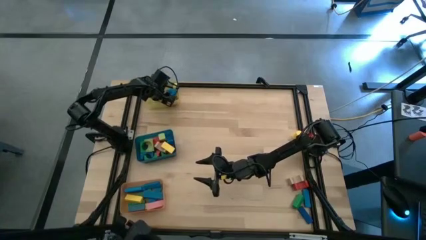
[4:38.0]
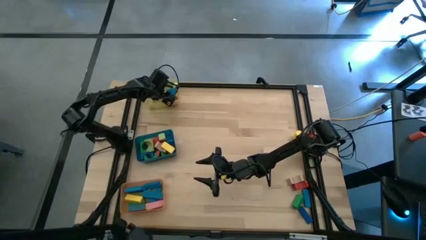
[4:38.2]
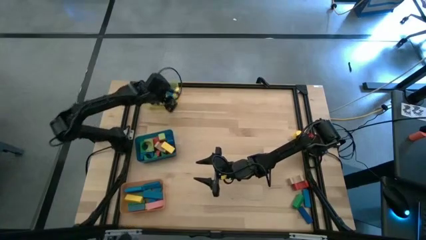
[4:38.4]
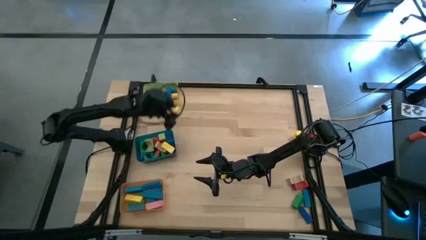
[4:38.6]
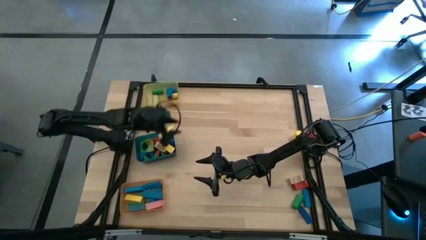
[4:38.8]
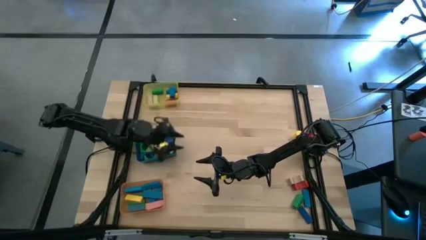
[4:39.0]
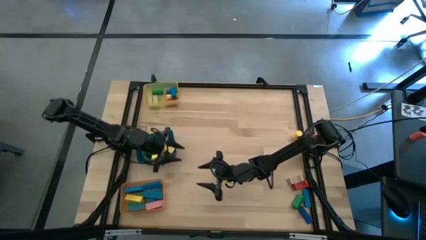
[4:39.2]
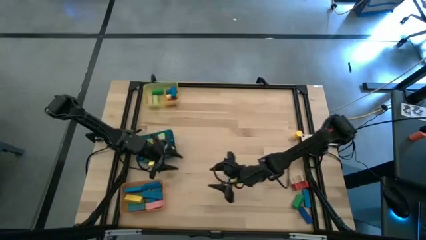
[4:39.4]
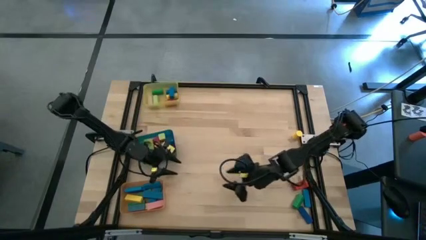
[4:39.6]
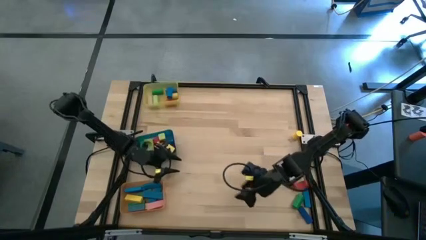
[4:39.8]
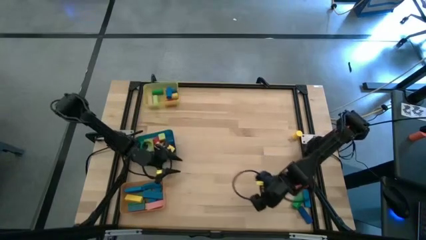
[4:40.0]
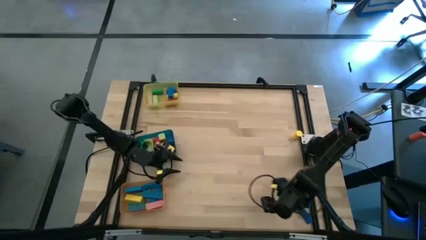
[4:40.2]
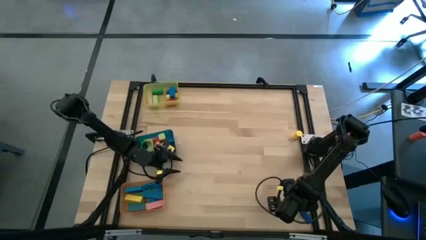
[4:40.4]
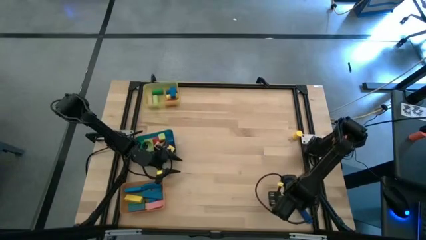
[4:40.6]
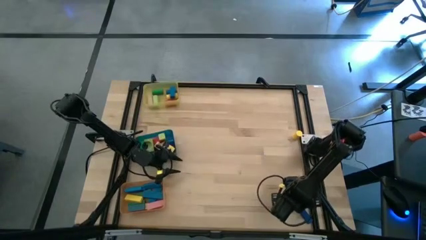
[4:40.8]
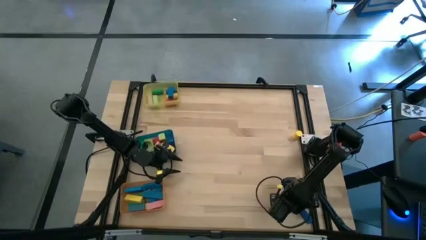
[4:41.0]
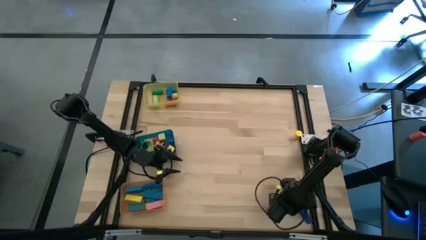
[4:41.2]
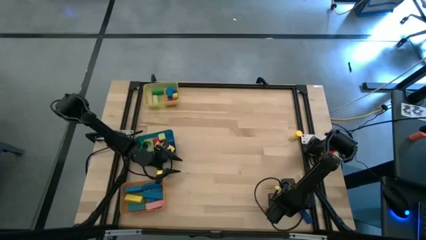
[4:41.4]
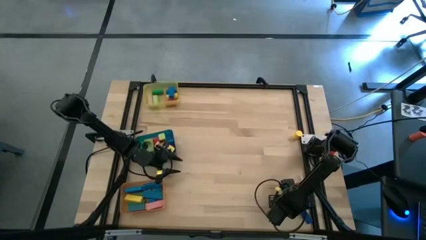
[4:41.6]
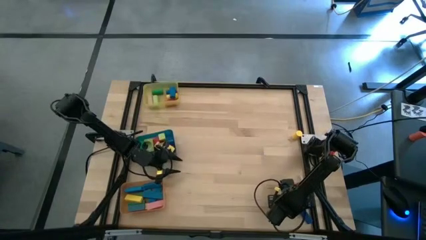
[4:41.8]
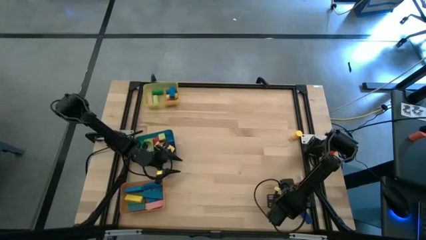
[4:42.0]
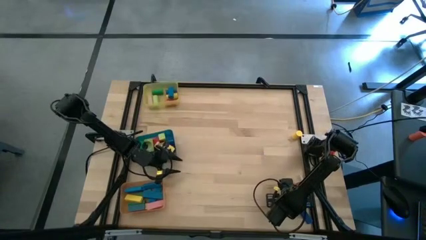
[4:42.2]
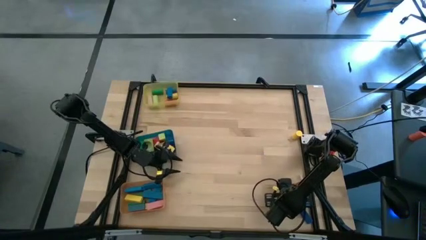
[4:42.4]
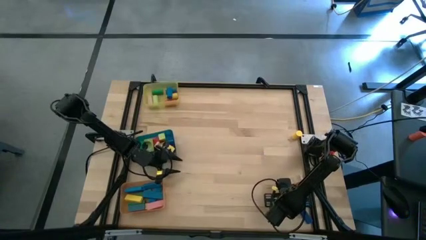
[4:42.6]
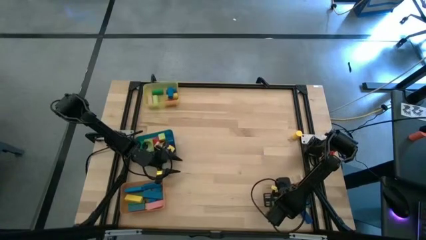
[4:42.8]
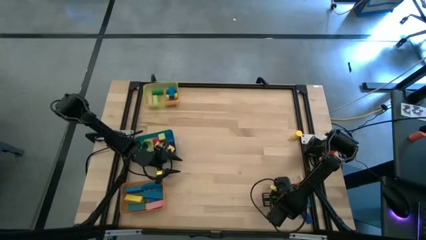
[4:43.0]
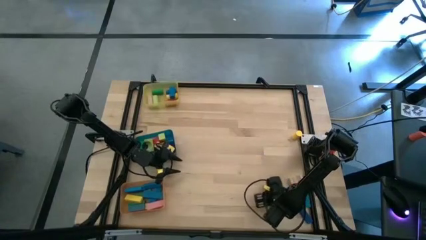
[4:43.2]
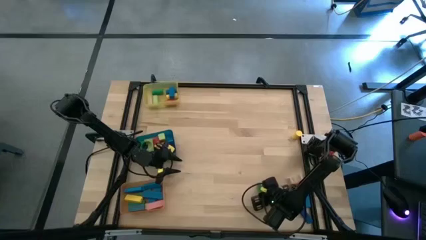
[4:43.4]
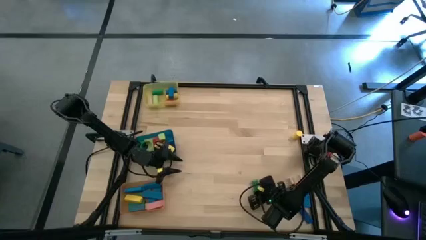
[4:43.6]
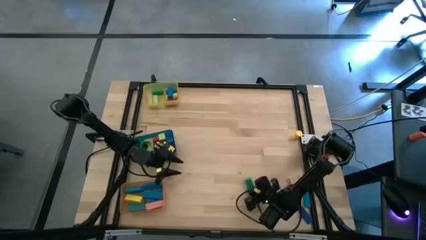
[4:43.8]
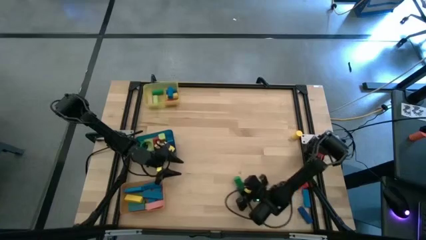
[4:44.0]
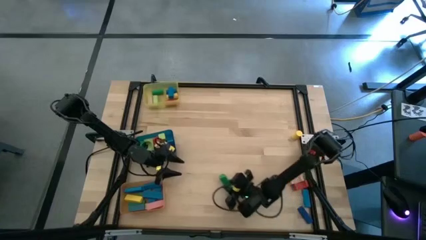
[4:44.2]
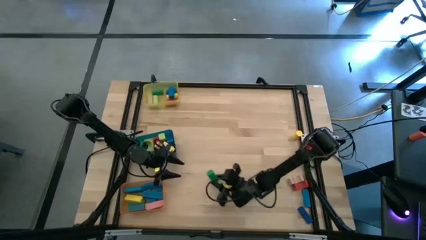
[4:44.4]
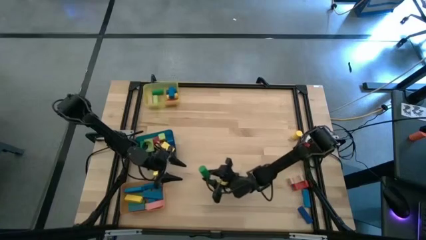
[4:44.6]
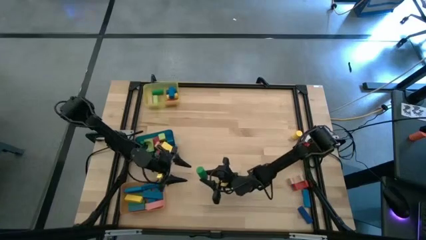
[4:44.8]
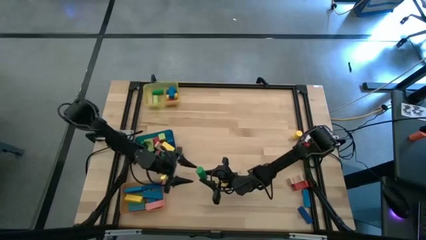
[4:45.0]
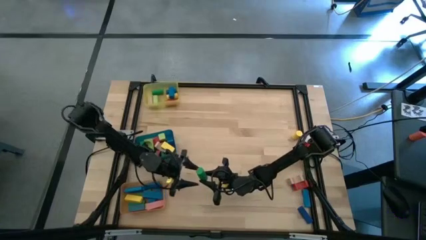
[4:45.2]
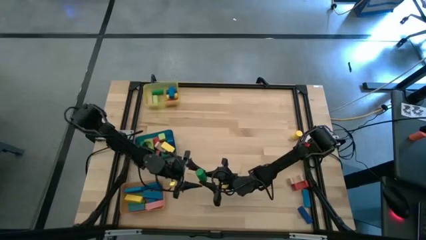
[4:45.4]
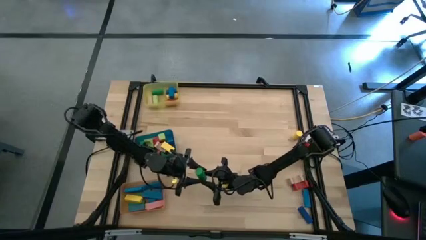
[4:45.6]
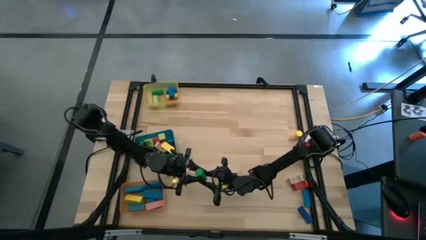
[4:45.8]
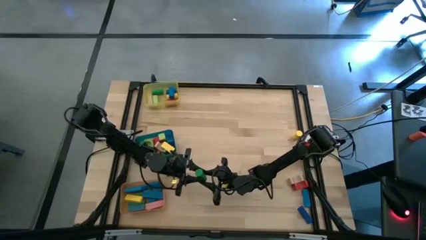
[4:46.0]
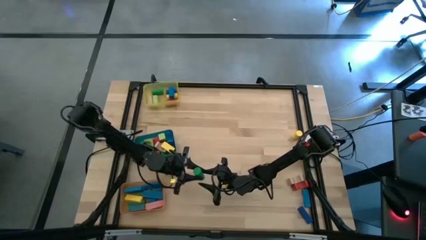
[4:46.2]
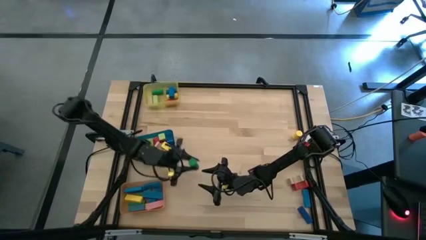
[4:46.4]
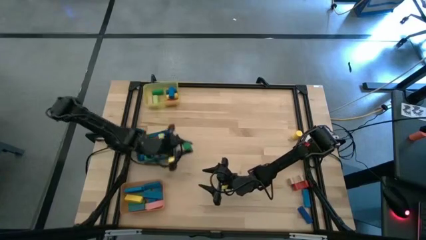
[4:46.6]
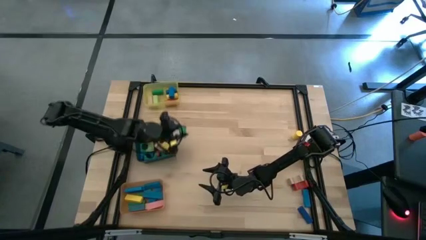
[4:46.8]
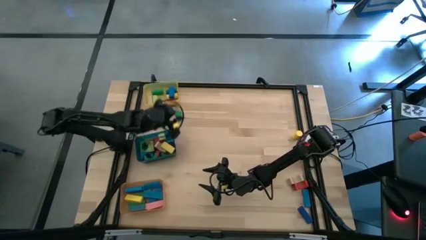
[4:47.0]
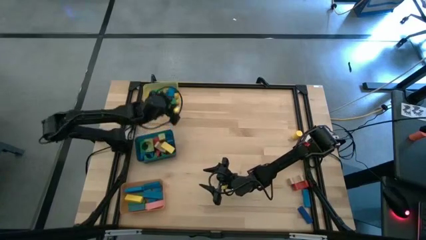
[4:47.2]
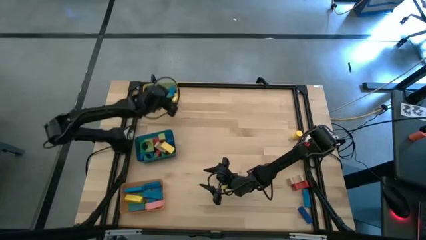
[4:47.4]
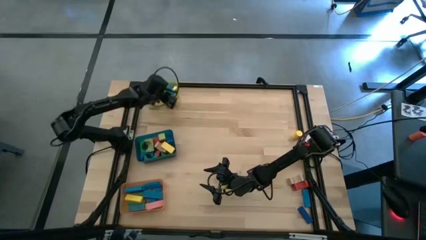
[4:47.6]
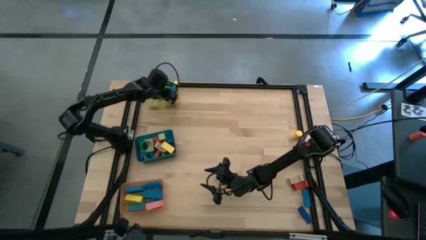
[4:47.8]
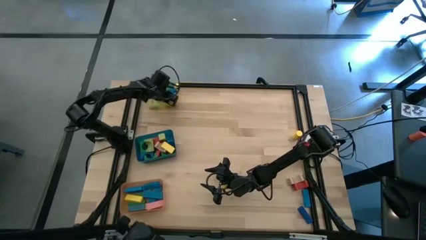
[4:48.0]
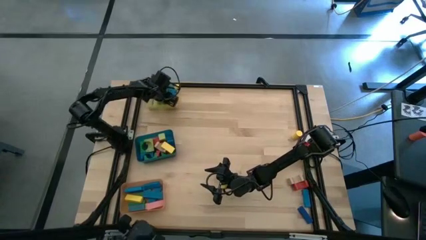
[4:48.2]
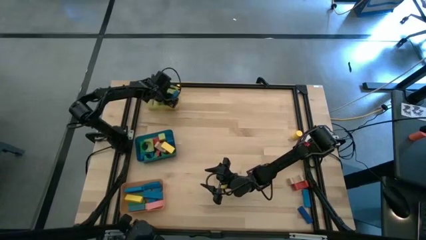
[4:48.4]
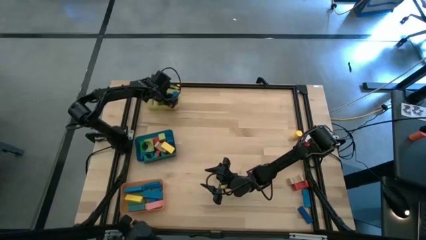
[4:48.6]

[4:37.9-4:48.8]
Task: Sort blocks by size
Put the green cylindrical block into the yellow bin

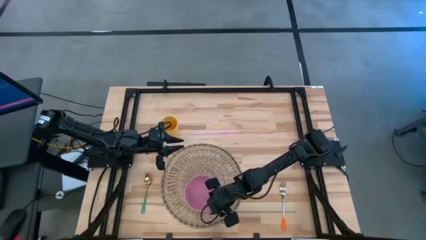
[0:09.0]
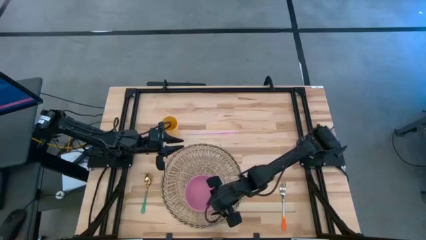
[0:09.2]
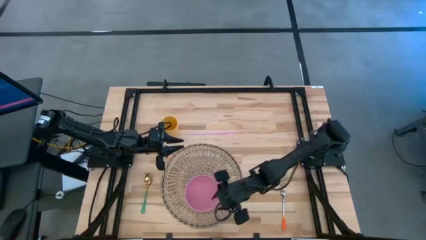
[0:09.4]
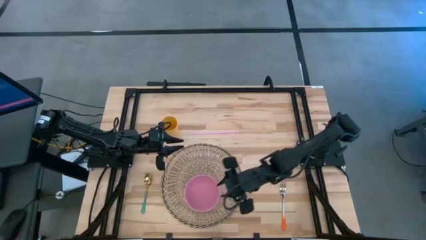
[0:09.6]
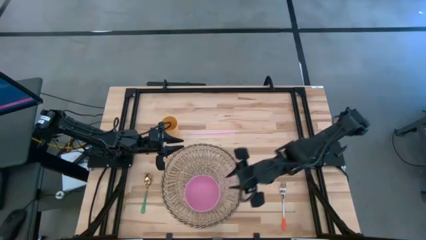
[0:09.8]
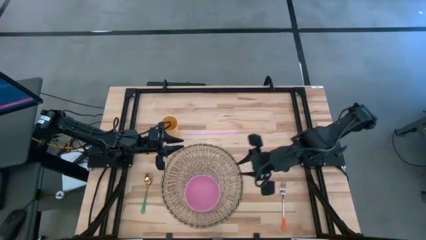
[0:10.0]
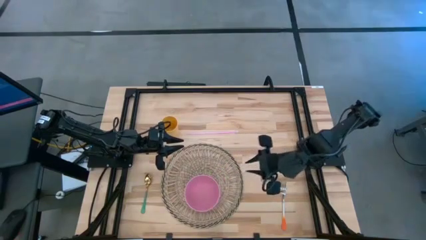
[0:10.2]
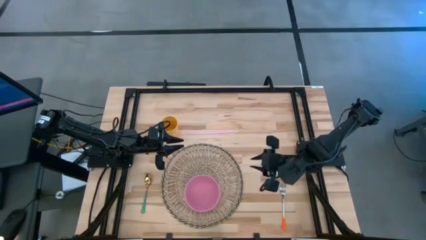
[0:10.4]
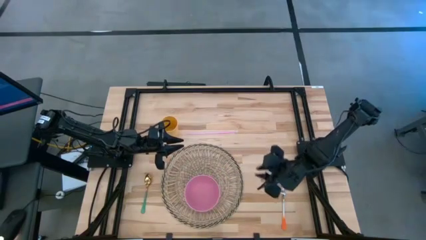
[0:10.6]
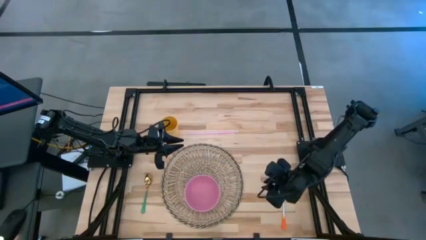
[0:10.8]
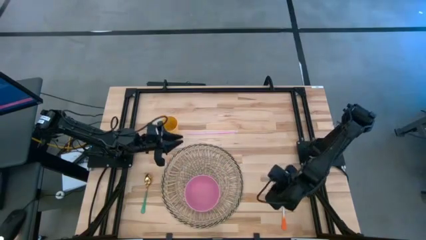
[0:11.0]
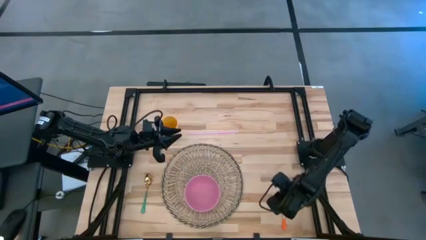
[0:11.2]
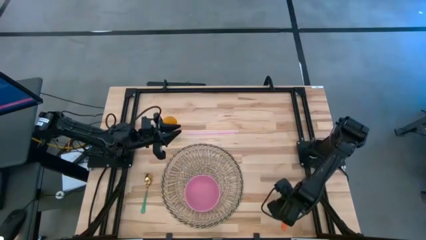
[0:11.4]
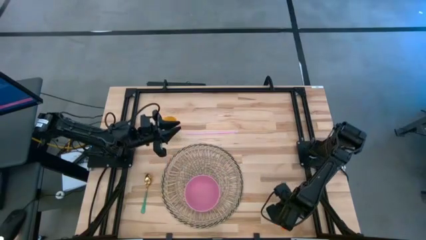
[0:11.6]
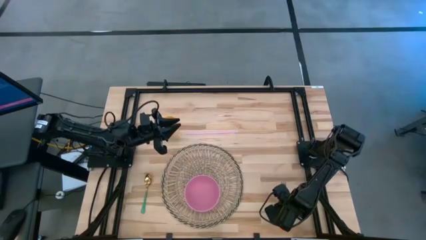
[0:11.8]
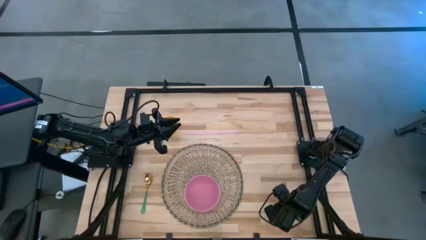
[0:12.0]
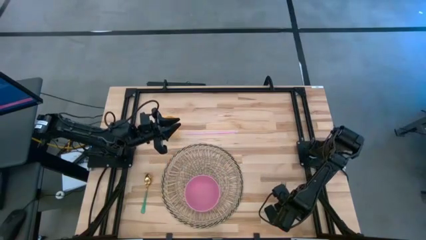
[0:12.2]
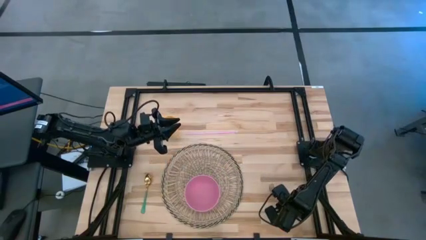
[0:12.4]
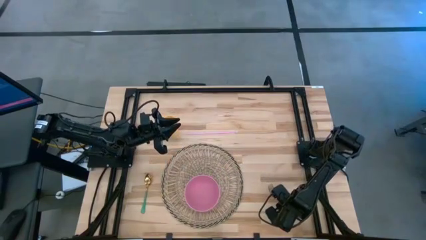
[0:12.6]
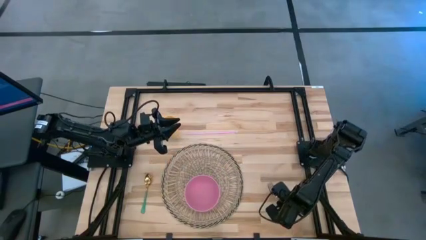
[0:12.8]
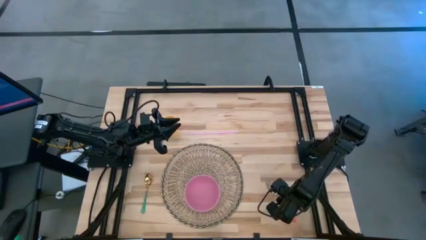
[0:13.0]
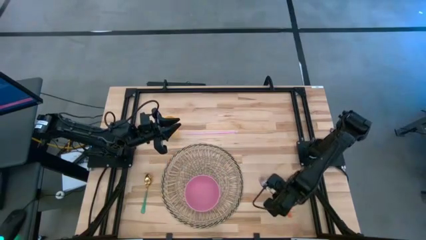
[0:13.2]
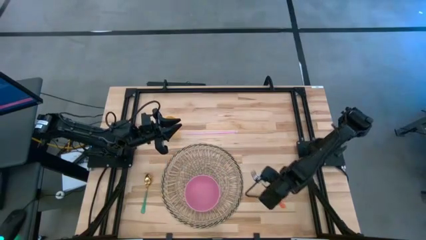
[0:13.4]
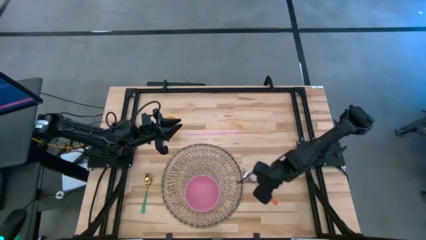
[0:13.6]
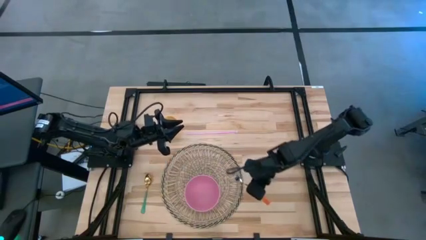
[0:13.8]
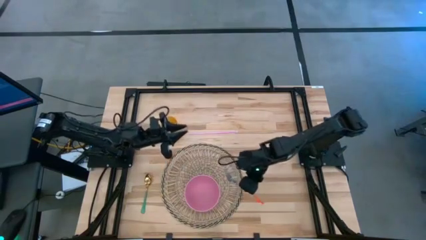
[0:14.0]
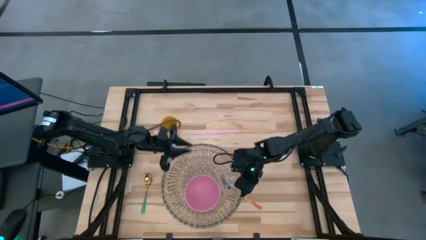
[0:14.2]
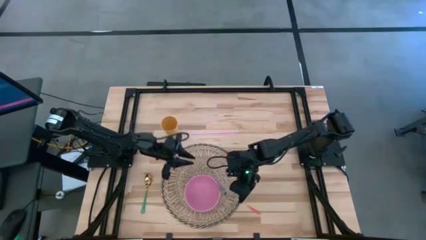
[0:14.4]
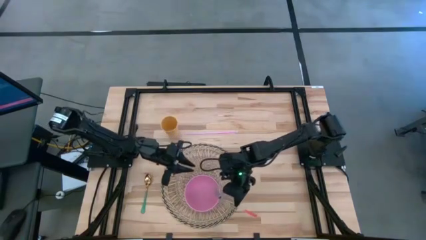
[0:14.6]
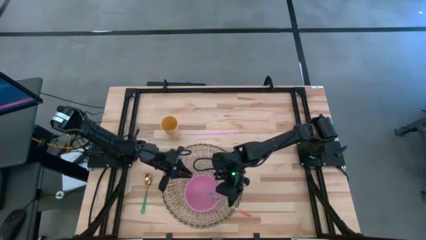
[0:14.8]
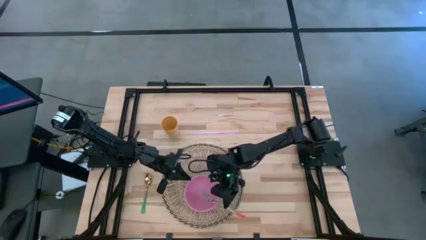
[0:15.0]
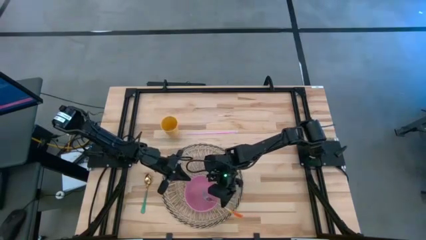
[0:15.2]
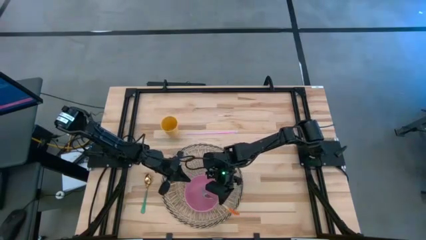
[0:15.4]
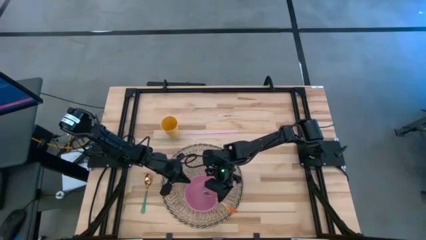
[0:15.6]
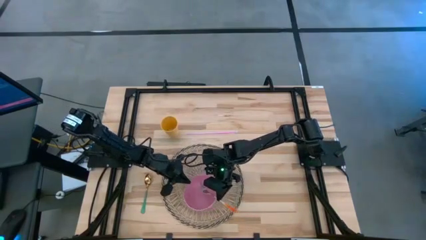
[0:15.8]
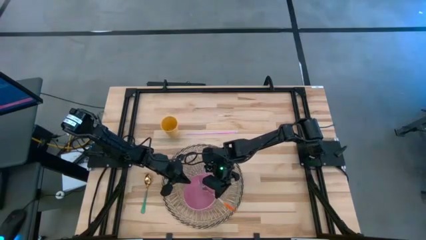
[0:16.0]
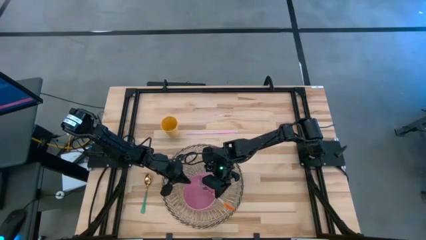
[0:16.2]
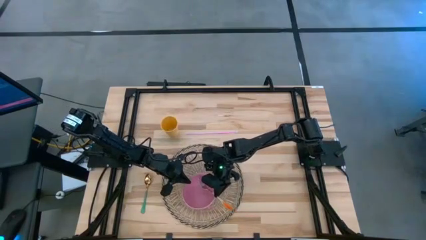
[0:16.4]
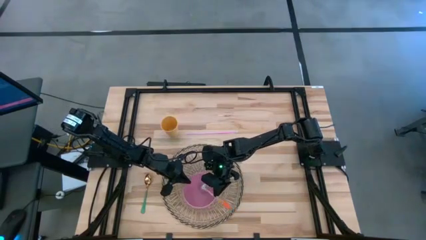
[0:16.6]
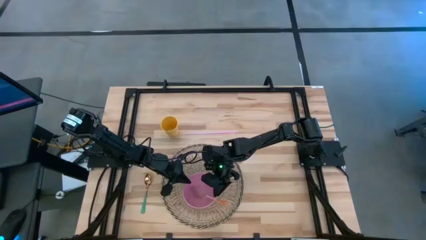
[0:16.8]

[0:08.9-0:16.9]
Task: Pick & Place Utensil
Put the orange fork into the pink bowl
